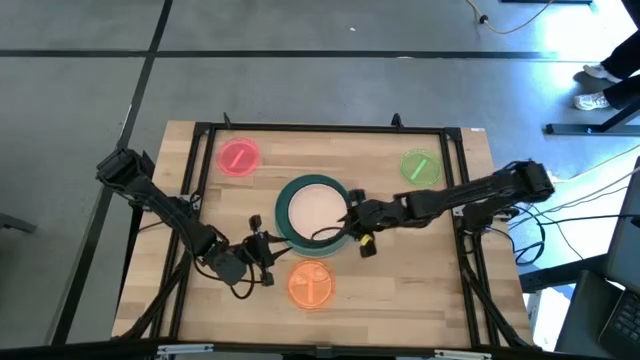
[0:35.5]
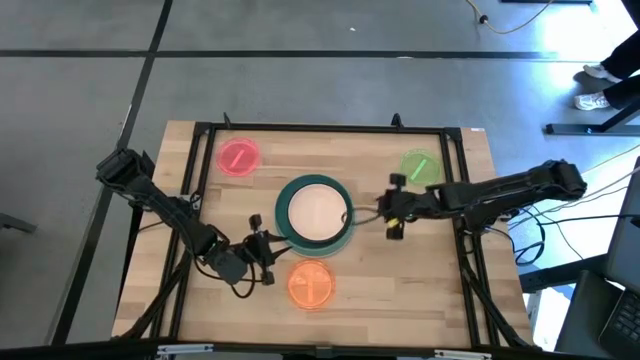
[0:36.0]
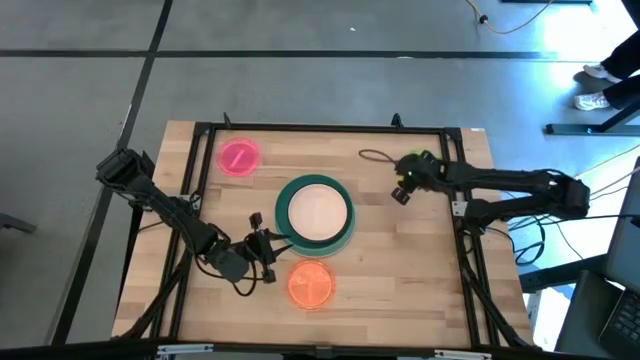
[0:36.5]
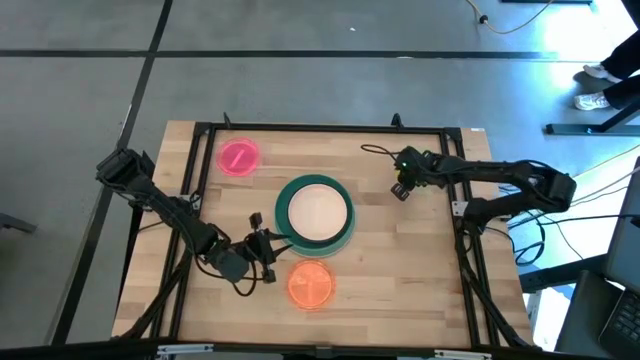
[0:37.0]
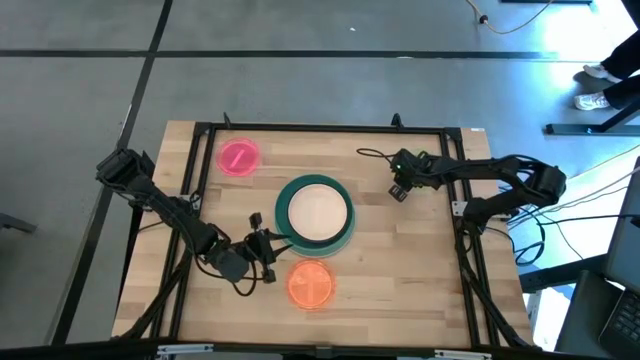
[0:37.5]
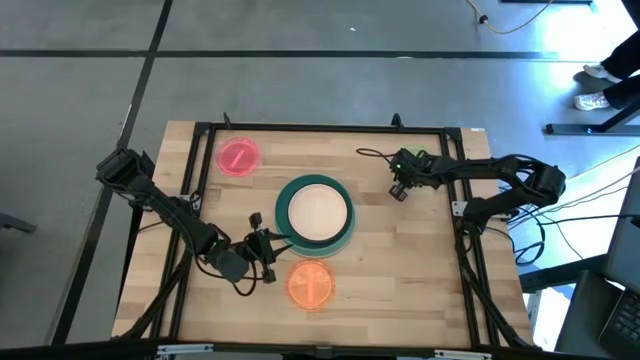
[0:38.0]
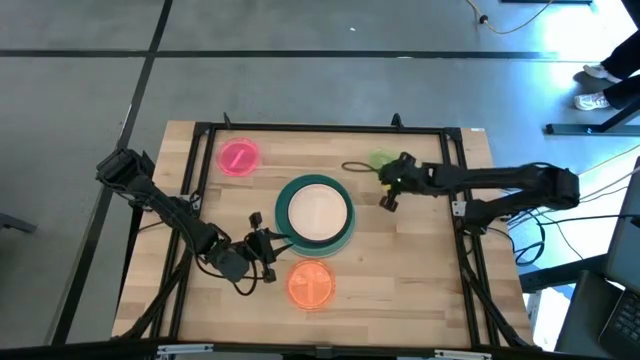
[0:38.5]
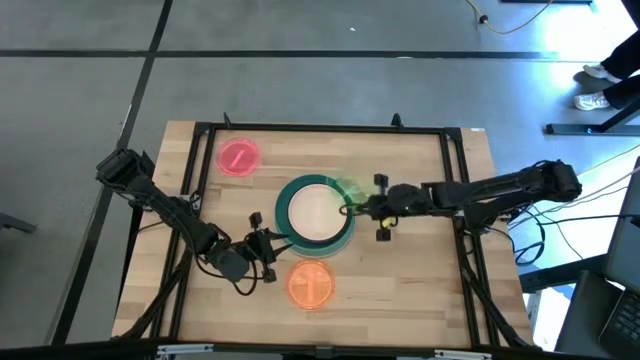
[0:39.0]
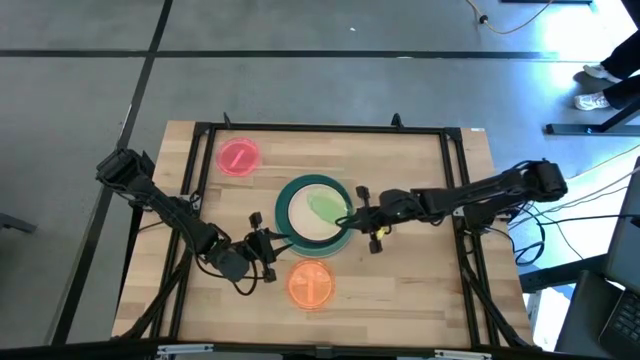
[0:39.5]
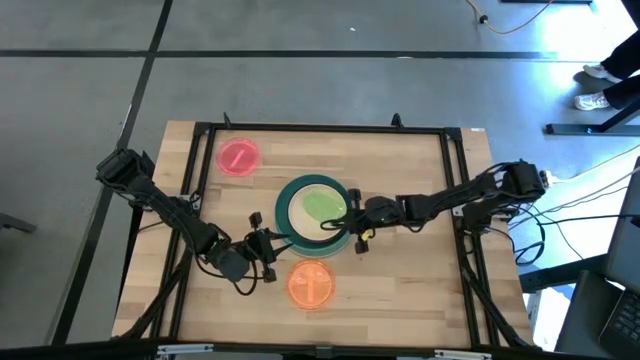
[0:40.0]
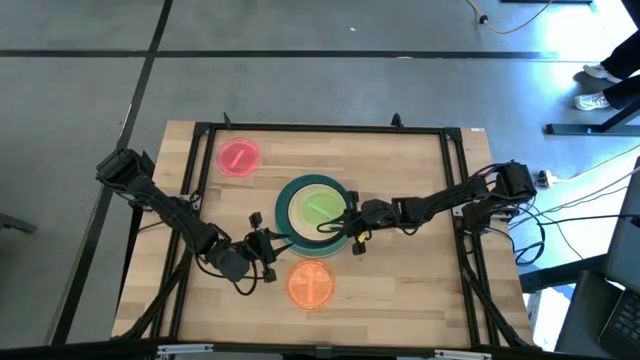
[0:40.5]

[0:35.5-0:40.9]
Task: Stack plastic plates
Stack the light green plate on the white plate

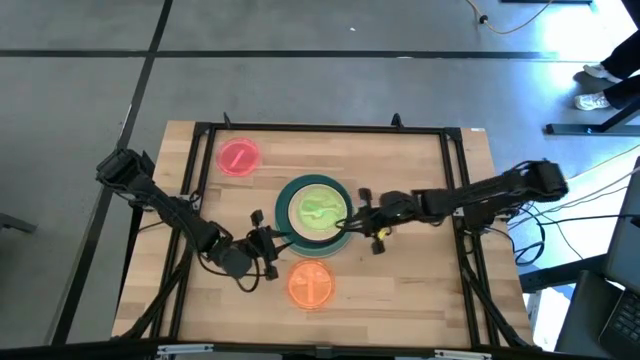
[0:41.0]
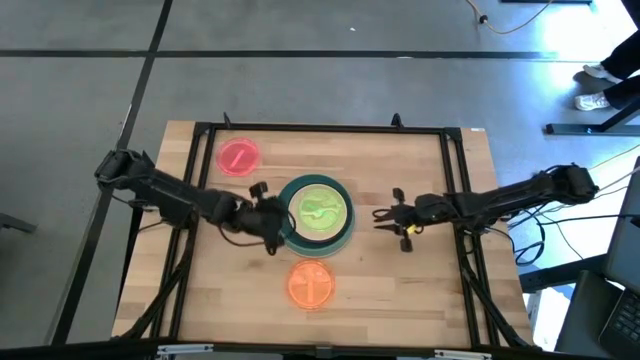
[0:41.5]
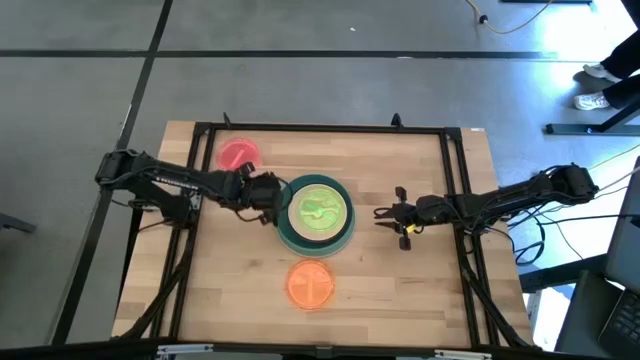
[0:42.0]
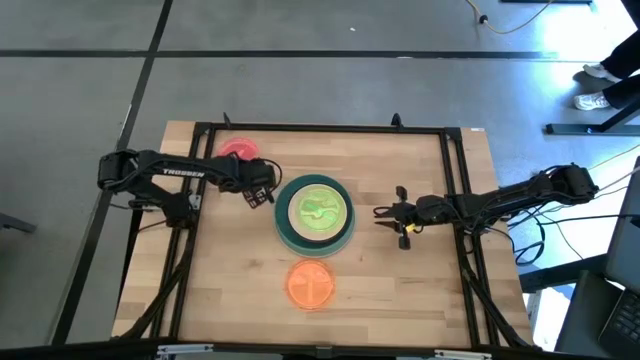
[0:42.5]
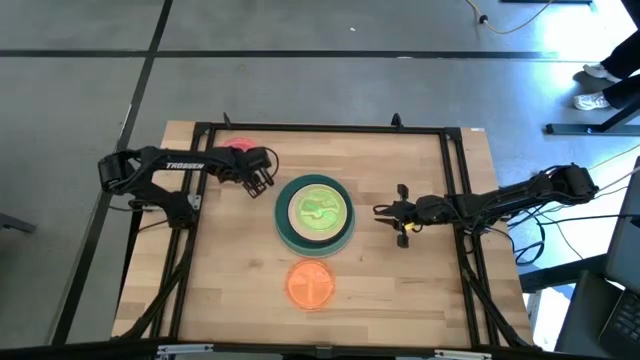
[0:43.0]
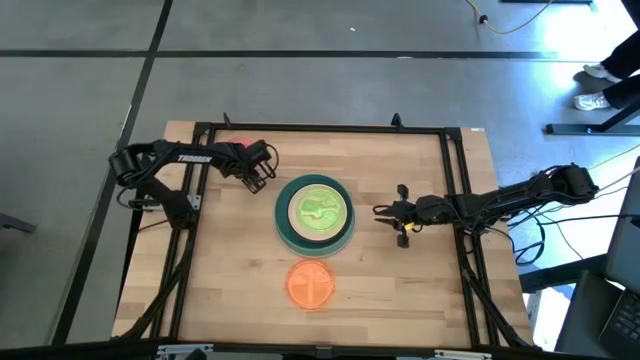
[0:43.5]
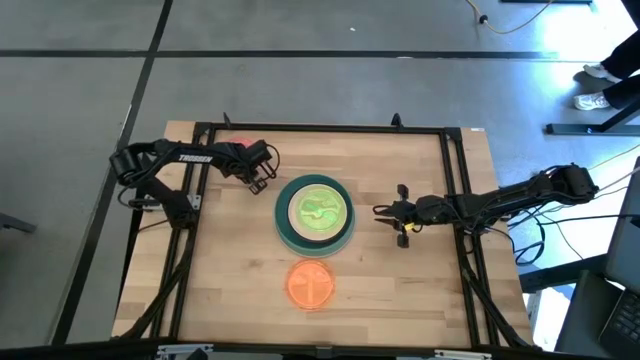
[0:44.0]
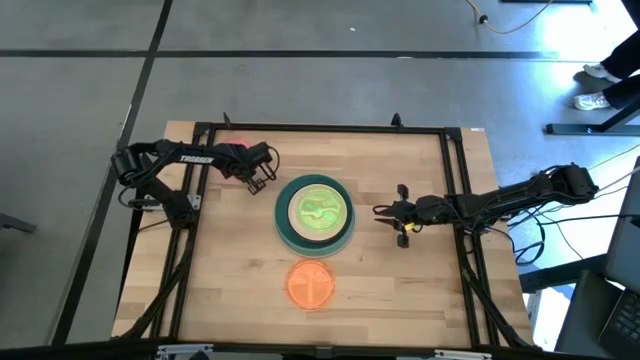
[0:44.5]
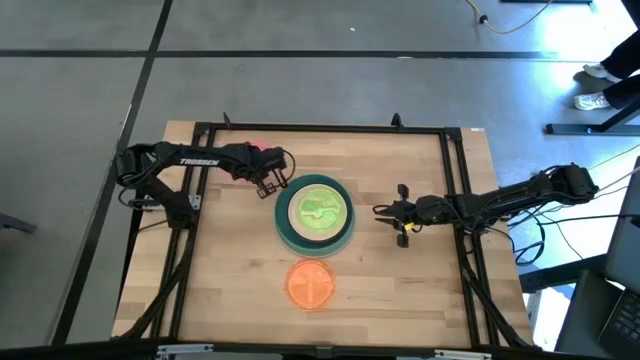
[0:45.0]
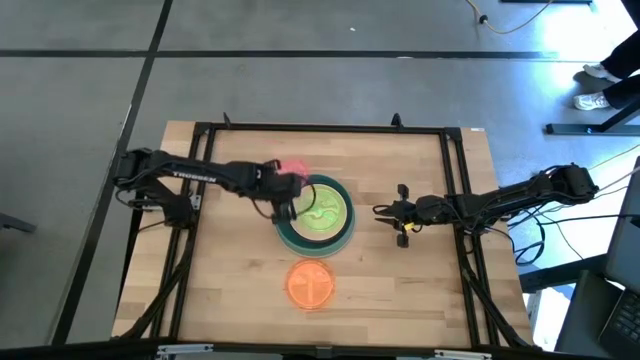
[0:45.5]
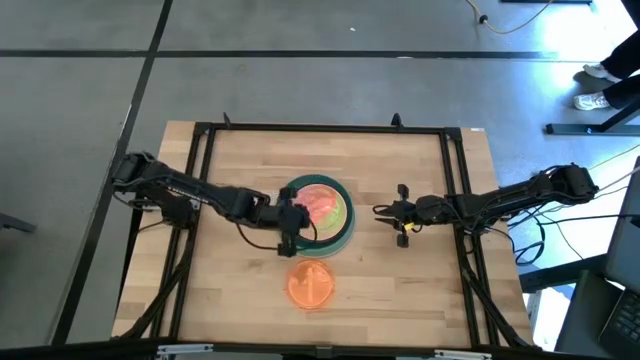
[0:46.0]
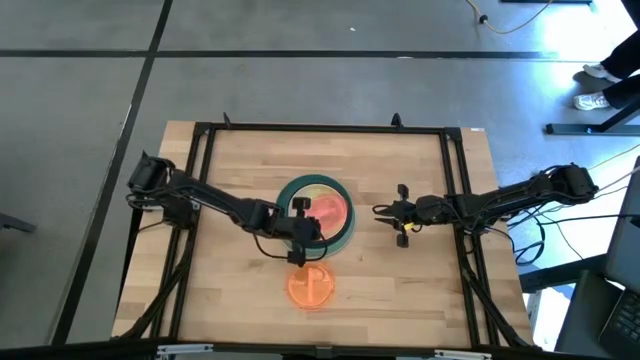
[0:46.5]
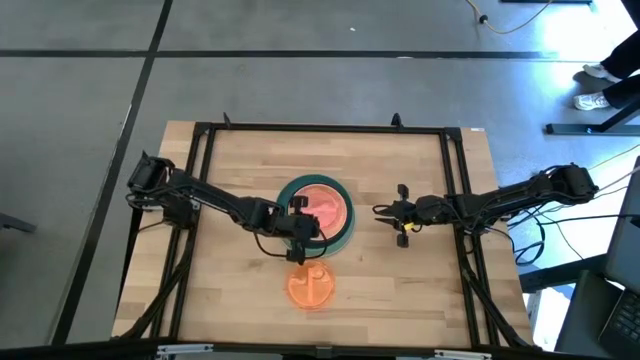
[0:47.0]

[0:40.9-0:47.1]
Stack the light pink plate on the light green plate

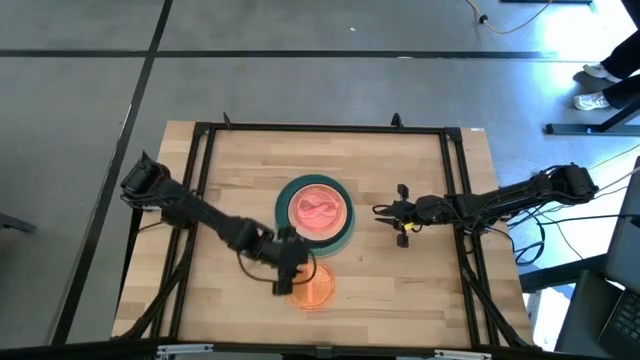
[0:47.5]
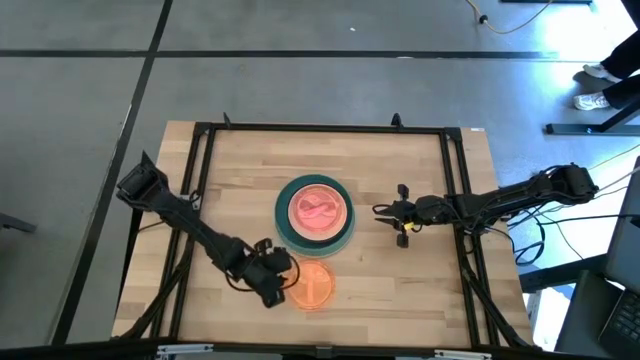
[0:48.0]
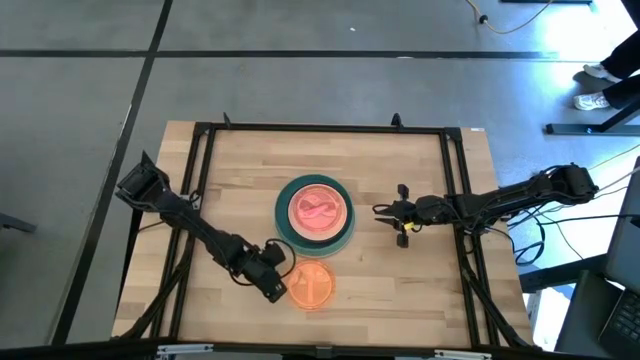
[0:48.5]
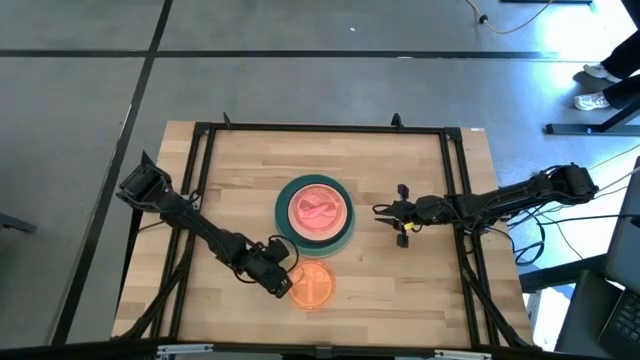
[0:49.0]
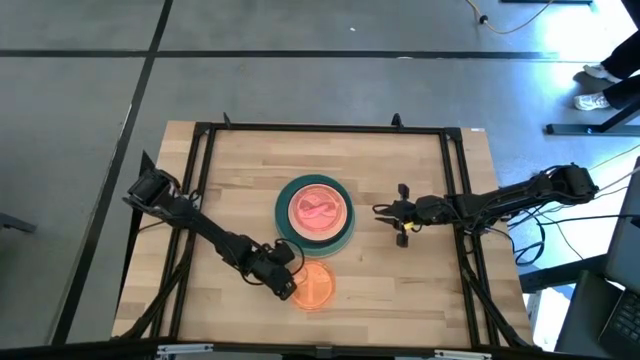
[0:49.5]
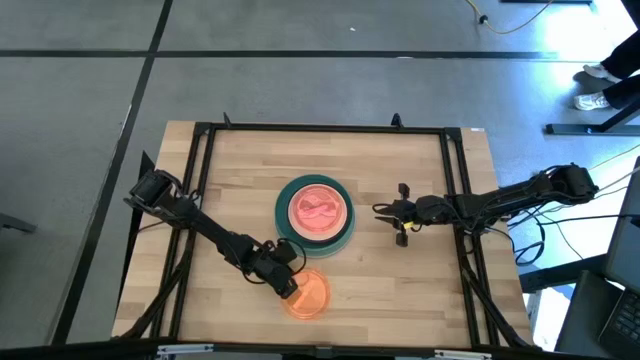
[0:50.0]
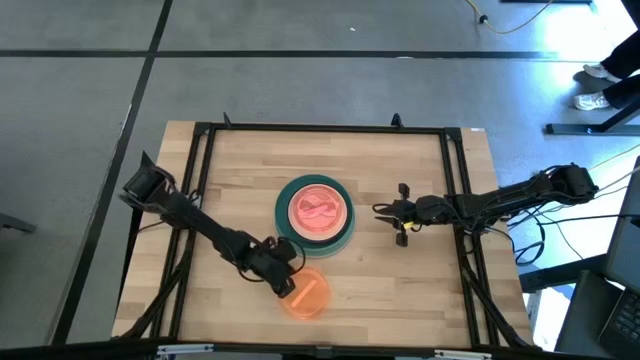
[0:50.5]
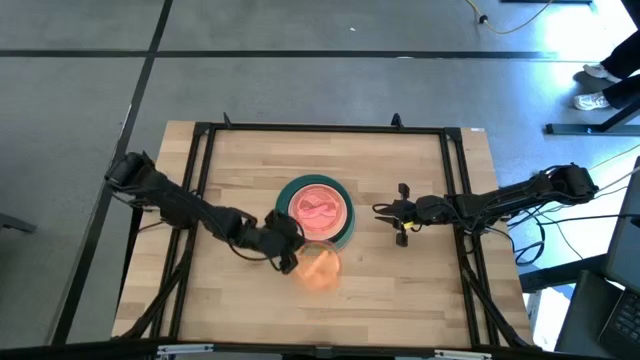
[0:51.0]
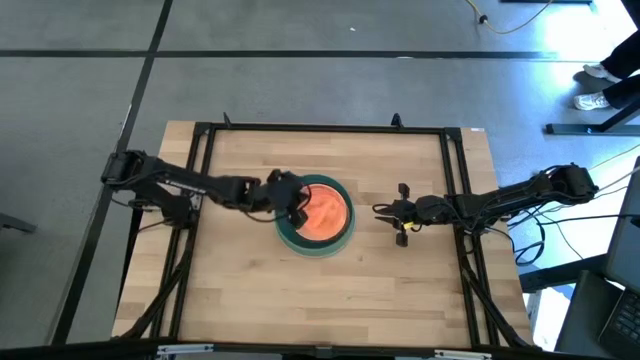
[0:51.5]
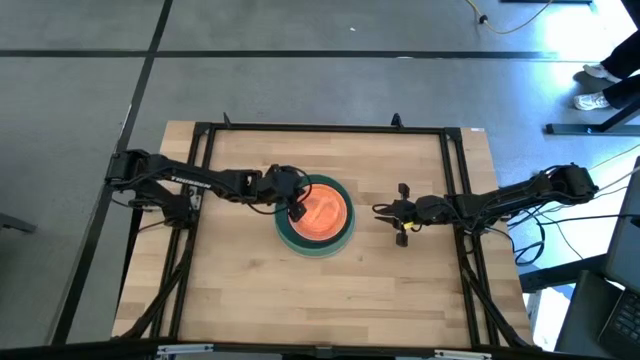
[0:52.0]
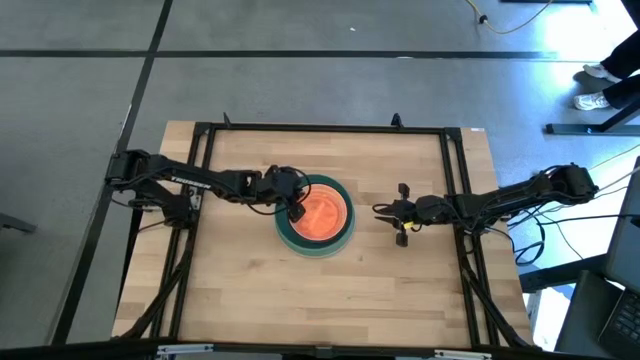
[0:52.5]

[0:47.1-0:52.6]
Stack the light orange plate on the light pink plate

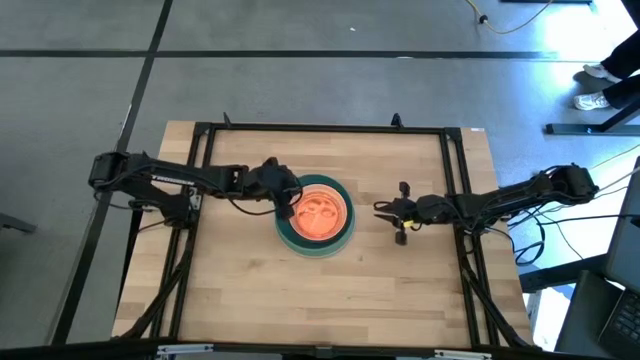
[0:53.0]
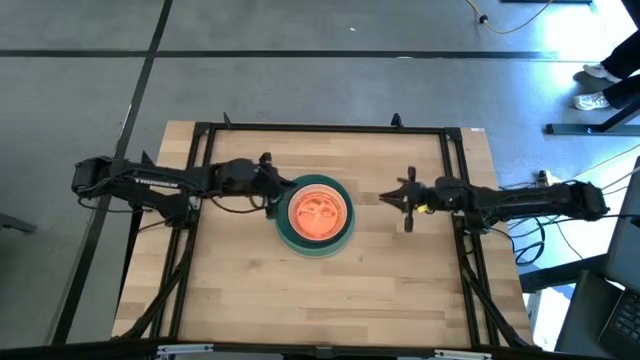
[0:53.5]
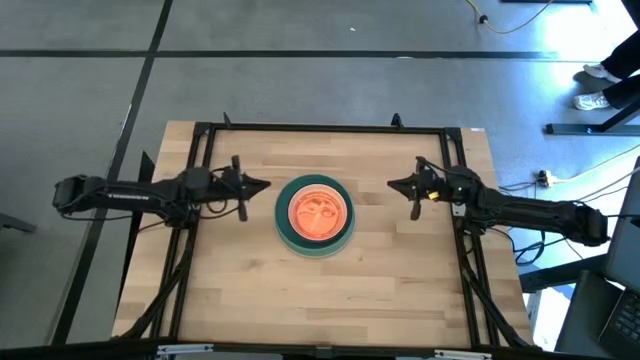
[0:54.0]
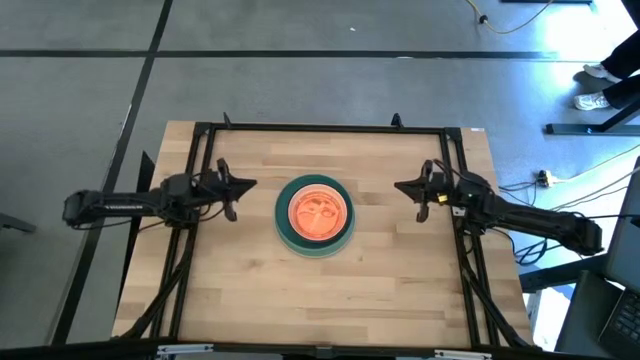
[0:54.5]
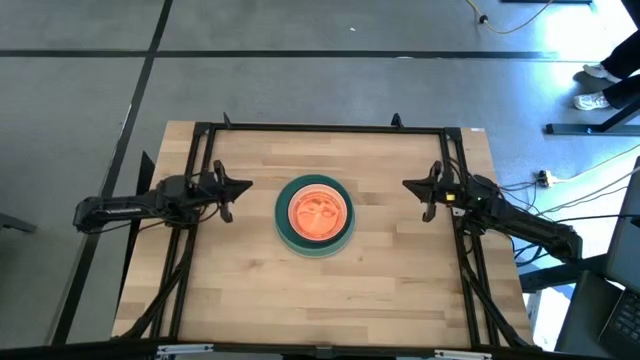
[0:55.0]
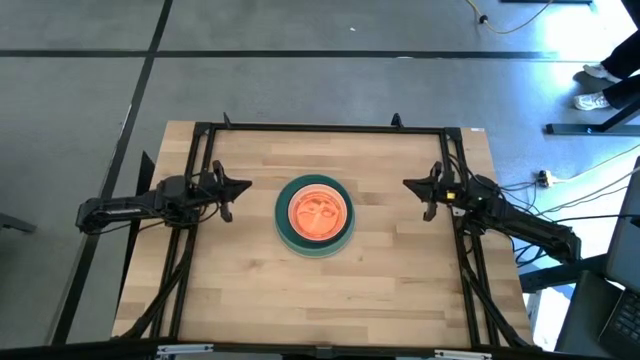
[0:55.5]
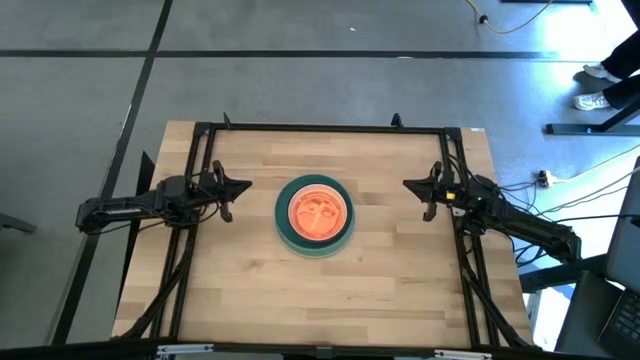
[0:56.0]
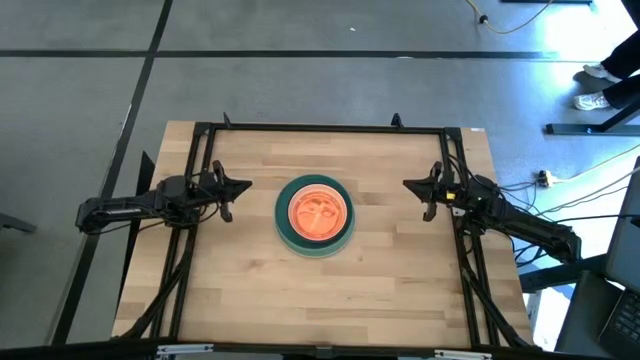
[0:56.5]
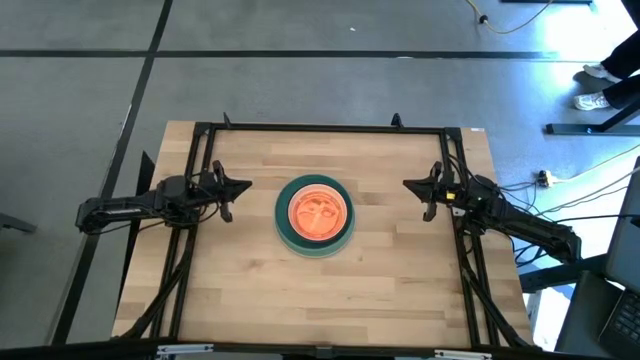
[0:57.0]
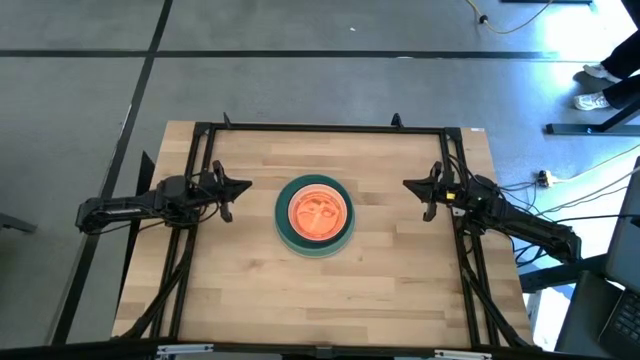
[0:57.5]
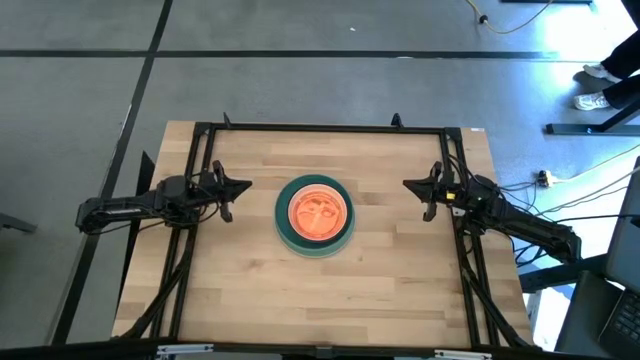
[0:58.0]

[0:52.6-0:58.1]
Return to Home Position
